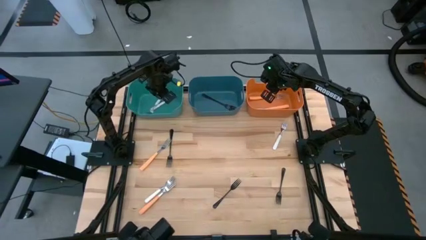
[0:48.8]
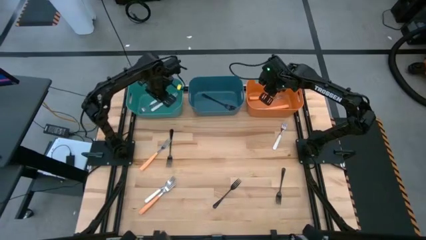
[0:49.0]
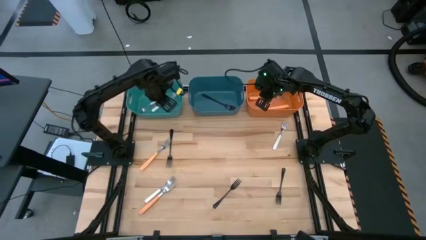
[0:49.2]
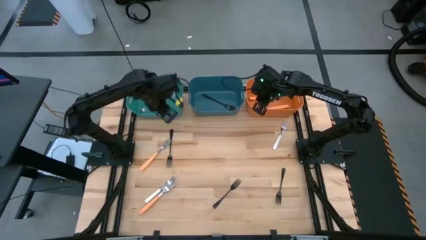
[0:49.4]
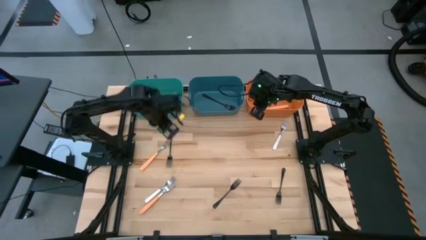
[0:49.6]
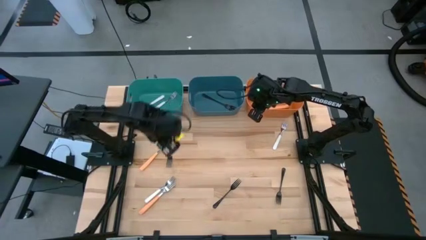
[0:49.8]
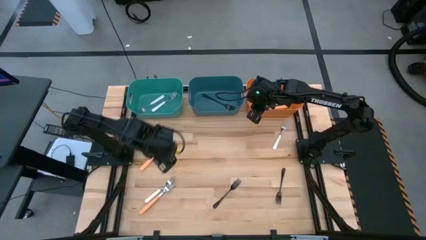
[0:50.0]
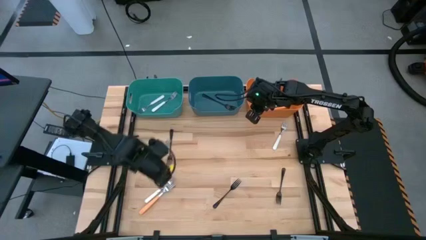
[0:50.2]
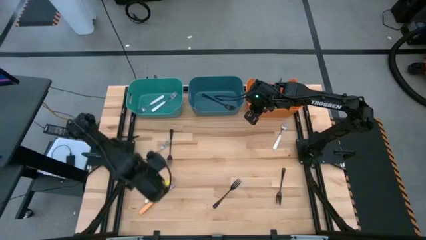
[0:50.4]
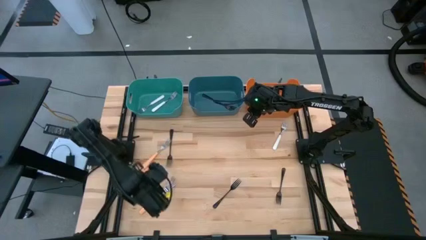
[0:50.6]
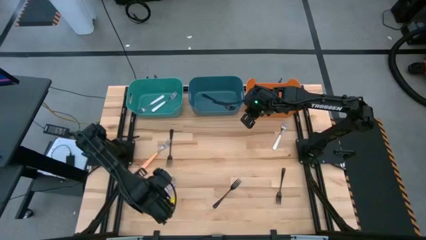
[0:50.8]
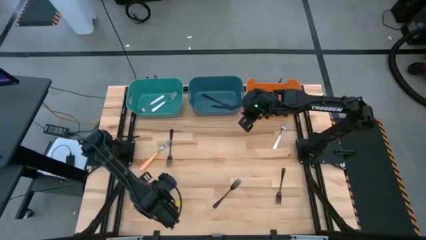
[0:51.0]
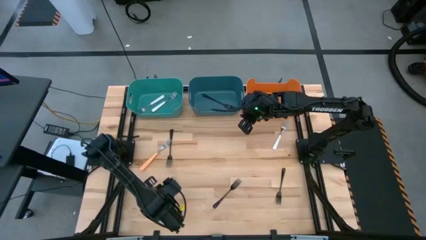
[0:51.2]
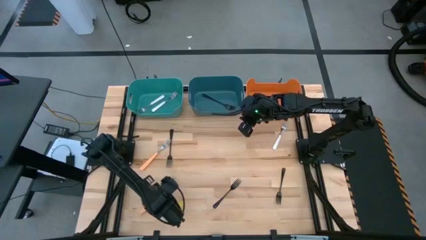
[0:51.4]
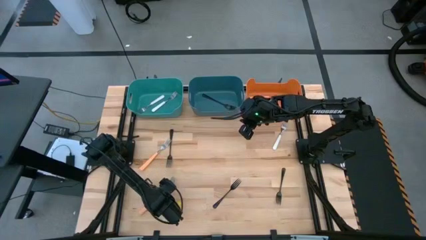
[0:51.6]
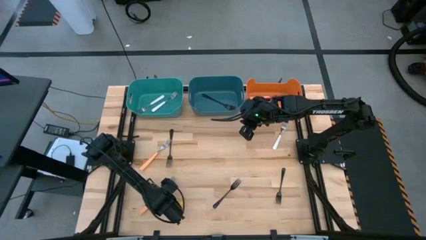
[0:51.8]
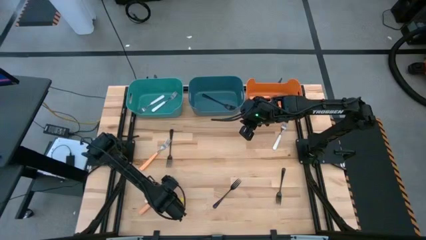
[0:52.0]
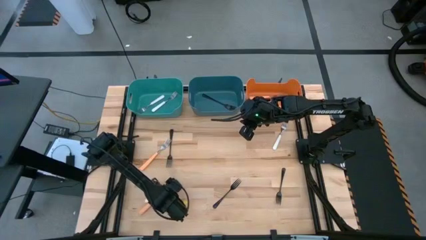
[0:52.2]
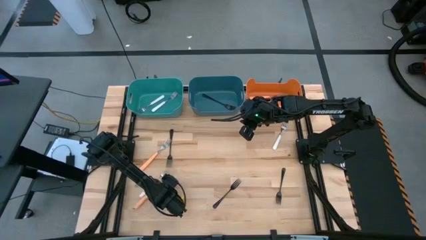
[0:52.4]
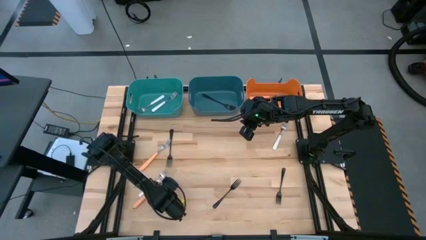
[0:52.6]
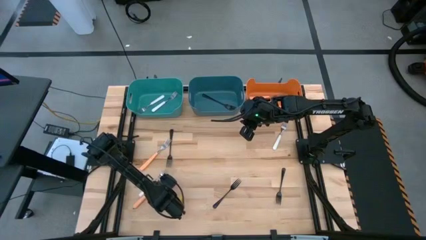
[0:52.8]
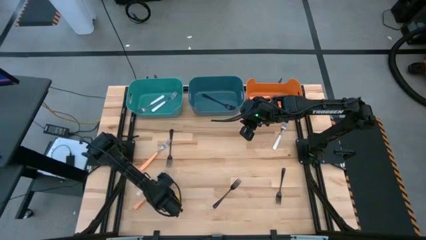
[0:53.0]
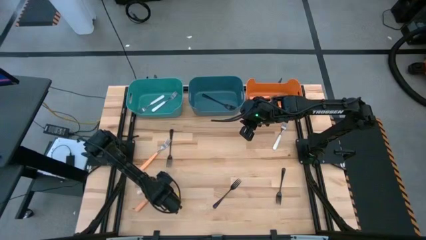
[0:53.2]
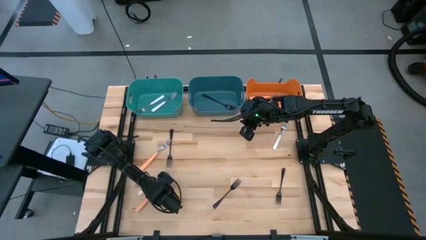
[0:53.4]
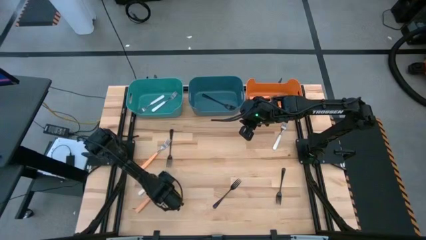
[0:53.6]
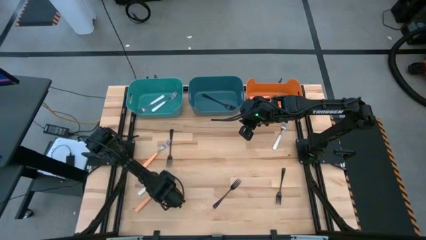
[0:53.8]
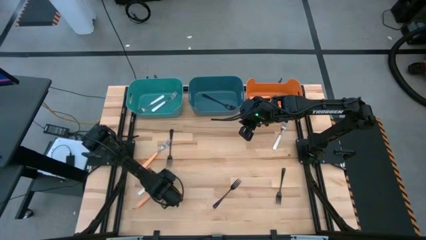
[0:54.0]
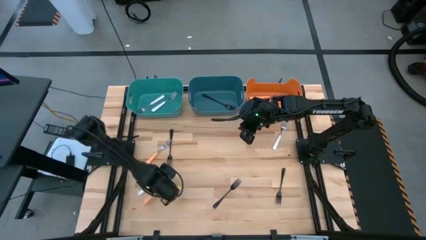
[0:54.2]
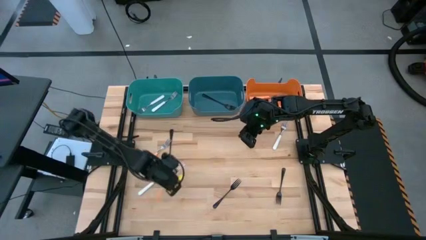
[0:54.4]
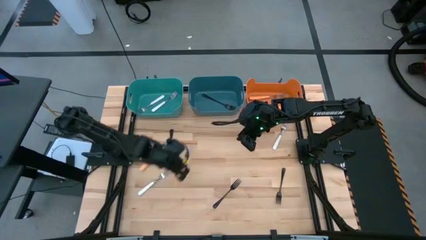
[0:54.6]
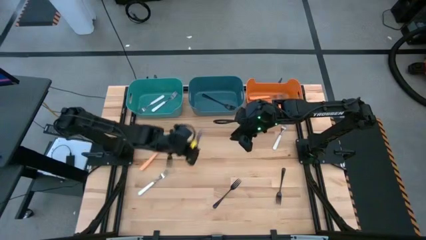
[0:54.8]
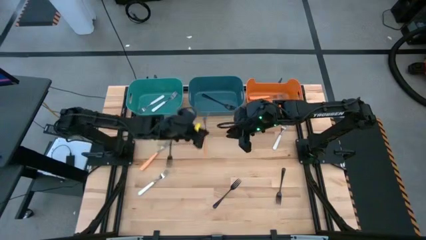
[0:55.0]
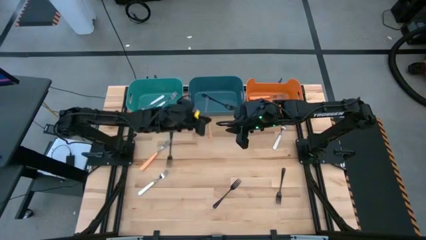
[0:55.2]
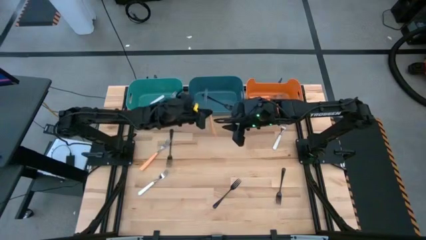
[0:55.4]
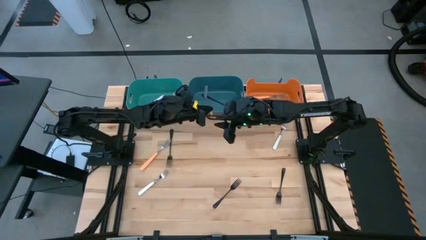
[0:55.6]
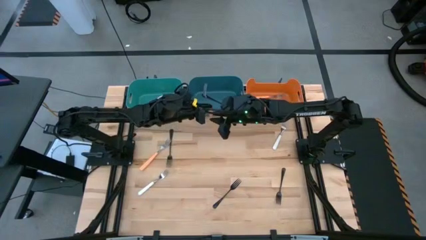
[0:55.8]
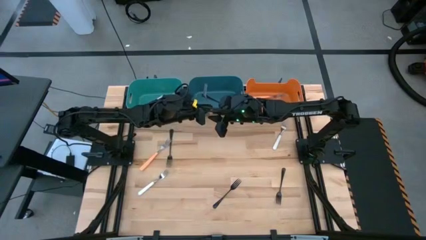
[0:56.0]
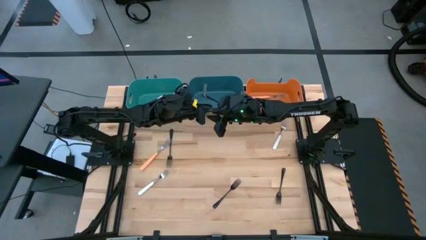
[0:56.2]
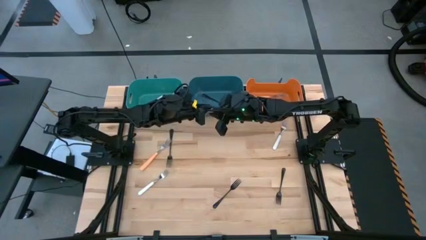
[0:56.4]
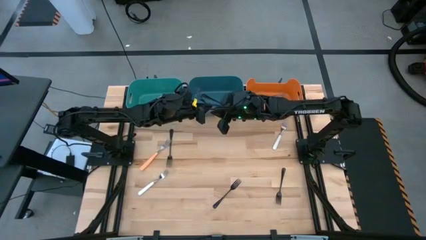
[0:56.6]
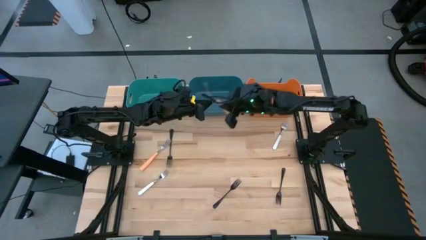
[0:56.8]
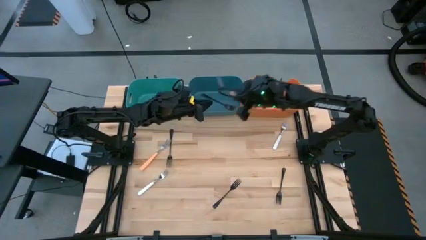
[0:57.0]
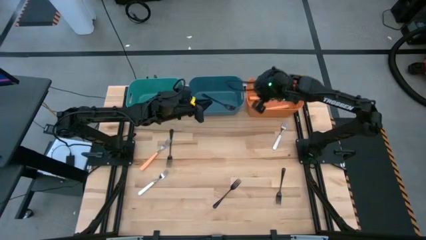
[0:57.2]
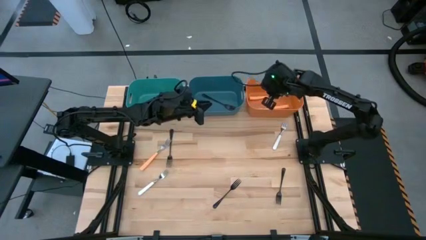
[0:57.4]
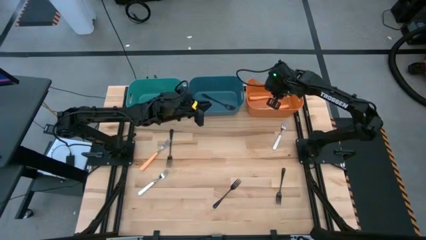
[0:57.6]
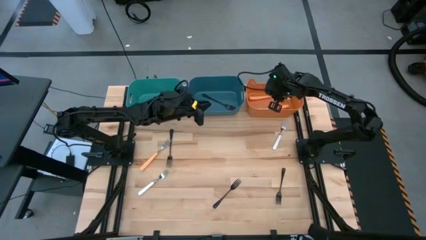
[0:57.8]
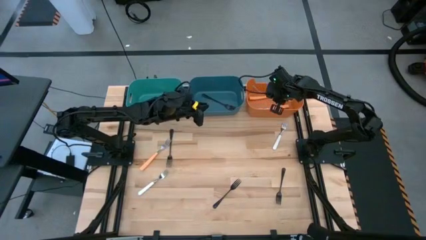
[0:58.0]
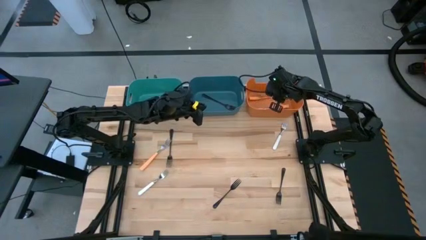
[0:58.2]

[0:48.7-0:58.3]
Task: Sort silverware by color (type)
Put the yellow fork into the orange bin

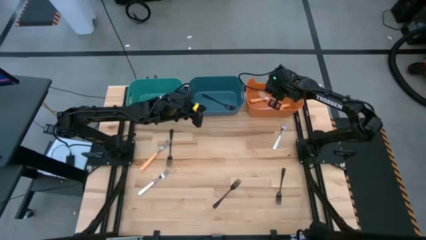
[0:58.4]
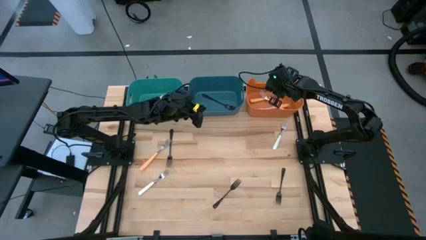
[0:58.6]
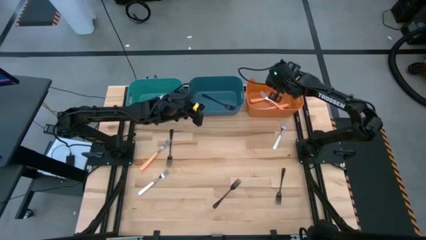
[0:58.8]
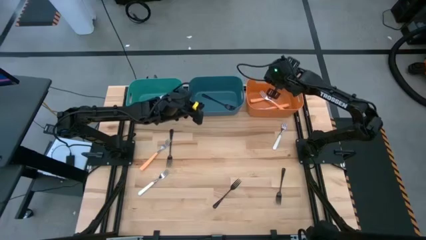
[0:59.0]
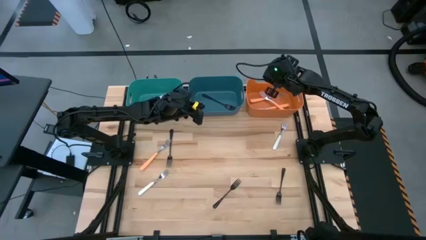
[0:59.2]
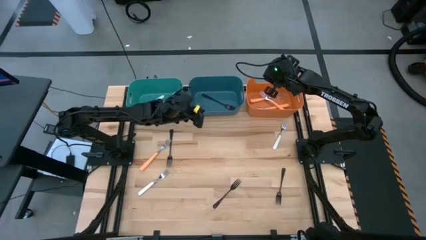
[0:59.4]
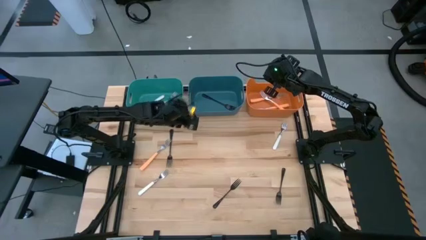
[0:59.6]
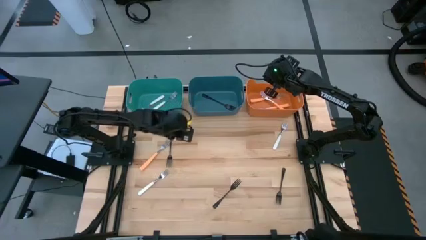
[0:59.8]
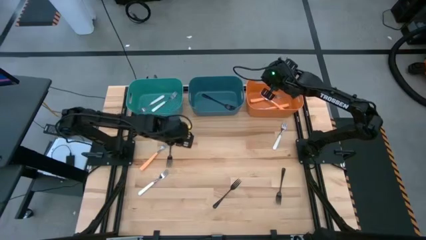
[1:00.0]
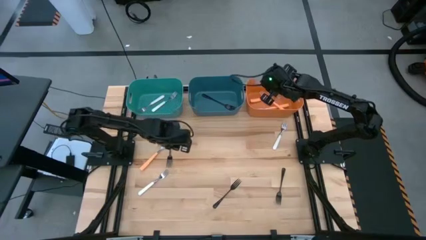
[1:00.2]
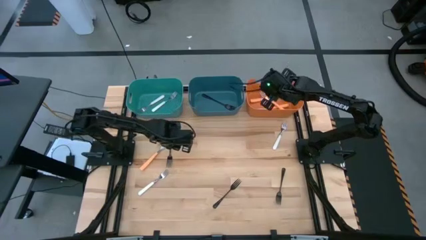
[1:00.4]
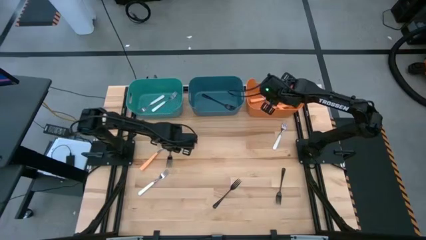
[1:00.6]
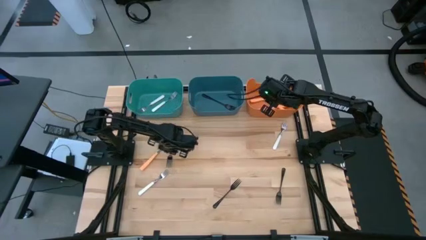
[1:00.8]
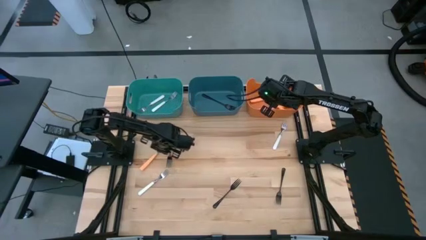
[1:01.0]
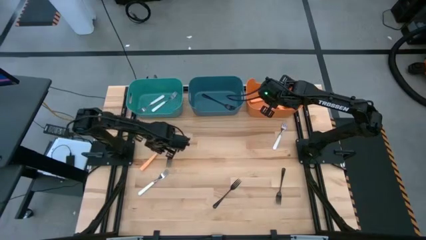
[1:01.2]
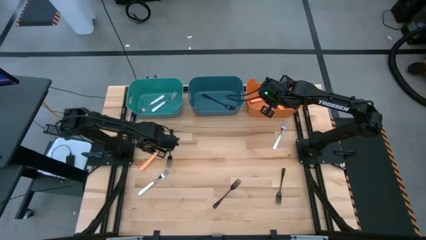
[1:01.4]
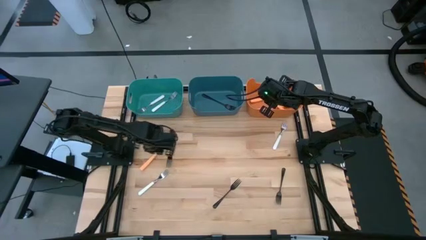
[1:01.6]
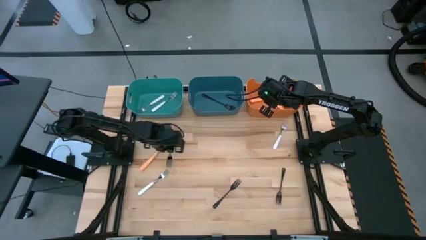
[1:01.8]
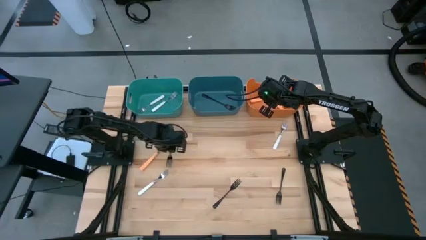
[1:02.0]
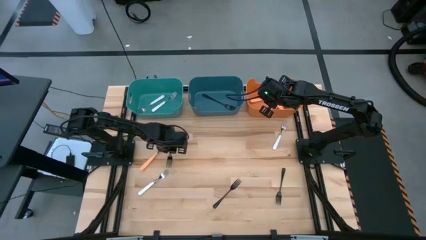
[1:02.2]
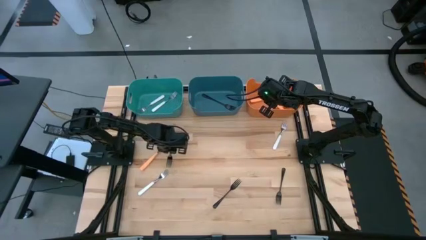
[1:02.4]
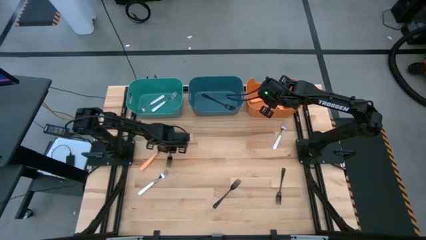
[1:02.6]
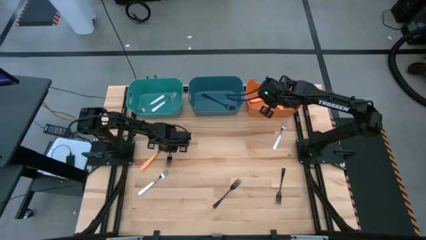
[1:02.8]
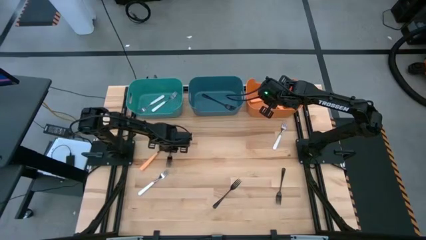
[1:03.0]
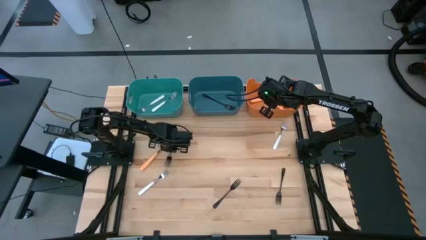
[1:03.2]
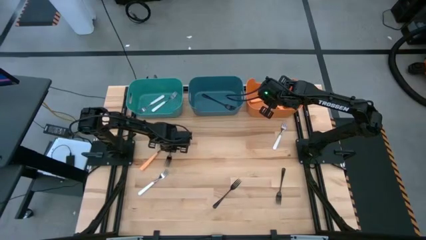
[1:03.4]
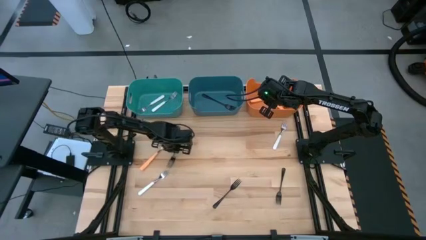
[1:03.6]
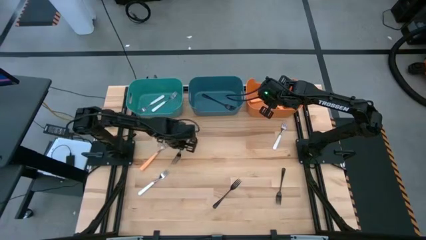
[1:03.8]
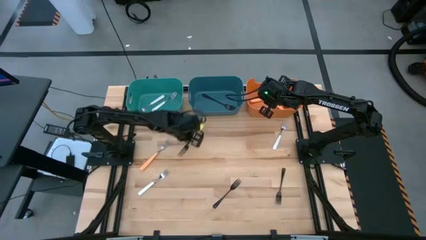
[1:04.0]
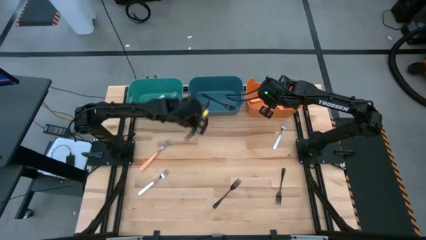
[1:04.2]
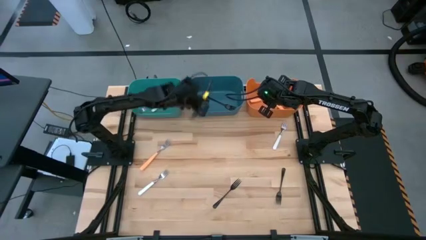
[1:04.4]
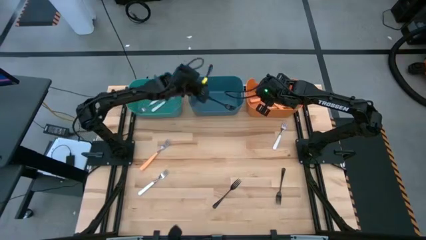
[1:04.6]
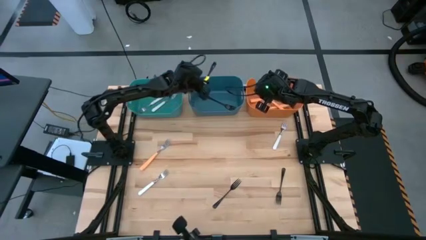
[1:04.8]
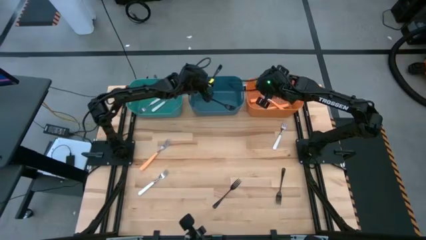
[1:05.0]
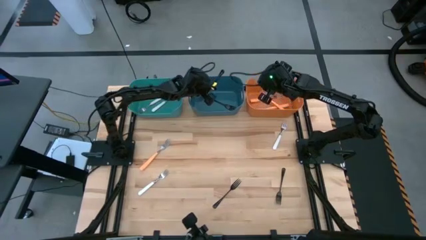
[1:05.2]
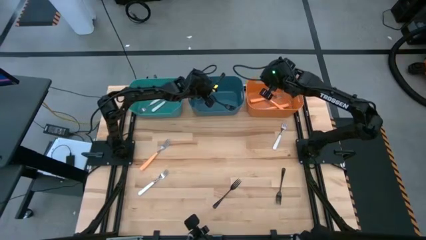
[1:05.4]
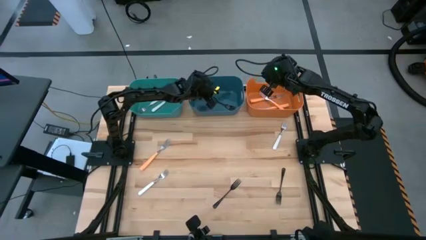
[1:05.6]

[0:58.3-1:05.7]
Put the black fork into the blue bin
